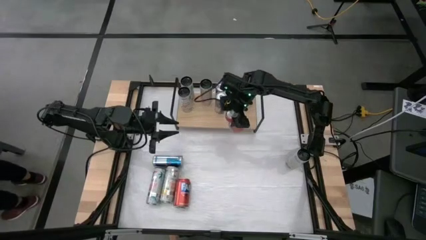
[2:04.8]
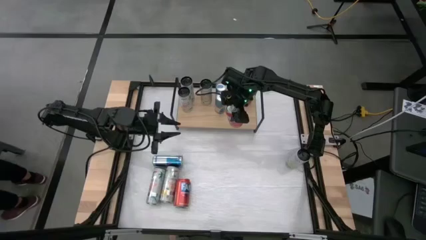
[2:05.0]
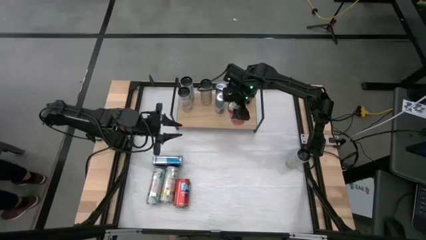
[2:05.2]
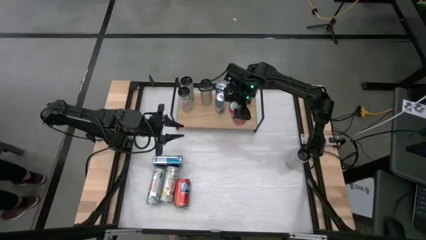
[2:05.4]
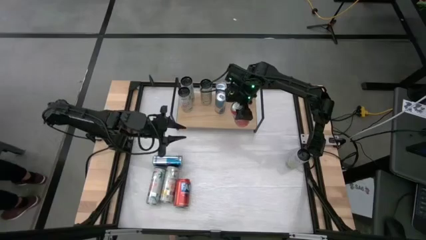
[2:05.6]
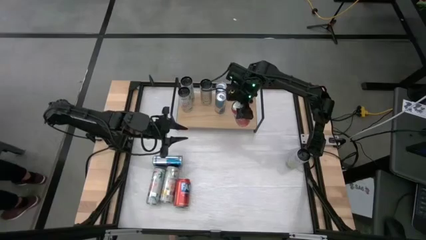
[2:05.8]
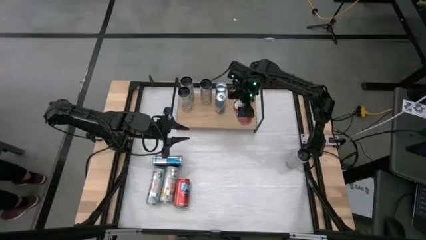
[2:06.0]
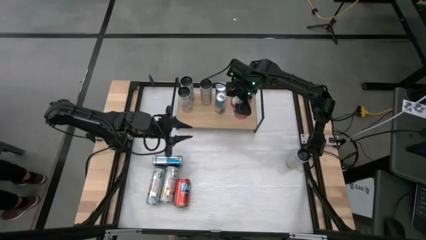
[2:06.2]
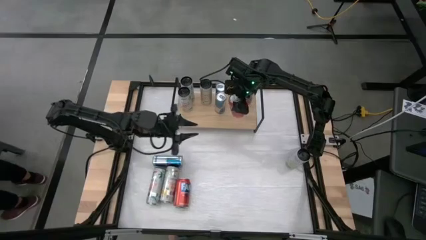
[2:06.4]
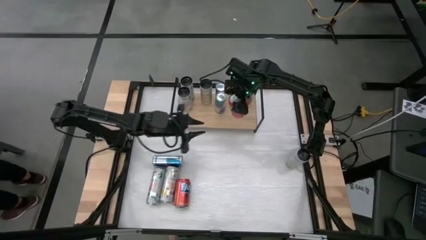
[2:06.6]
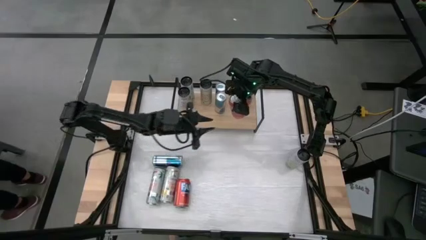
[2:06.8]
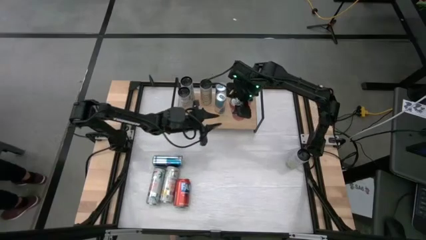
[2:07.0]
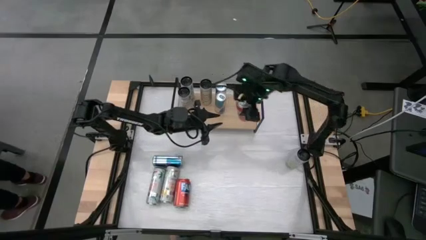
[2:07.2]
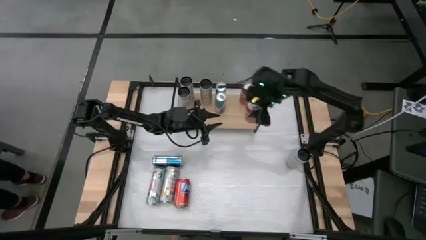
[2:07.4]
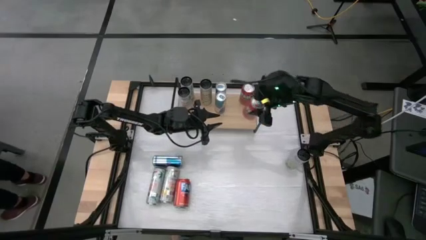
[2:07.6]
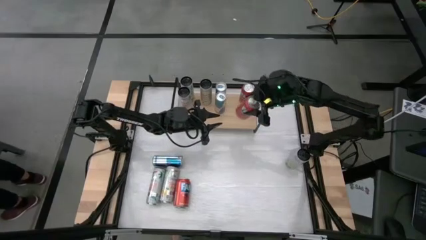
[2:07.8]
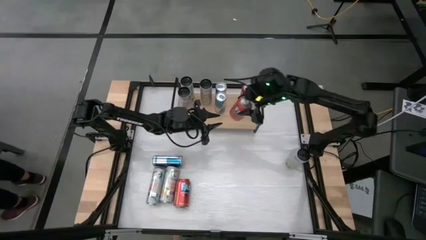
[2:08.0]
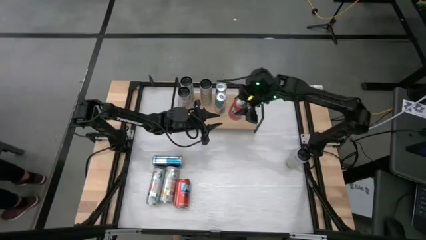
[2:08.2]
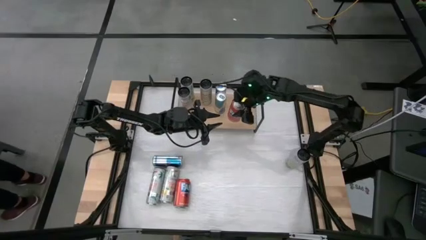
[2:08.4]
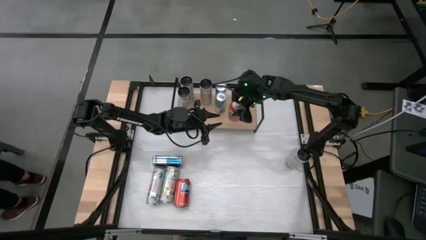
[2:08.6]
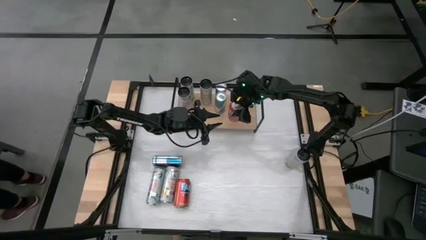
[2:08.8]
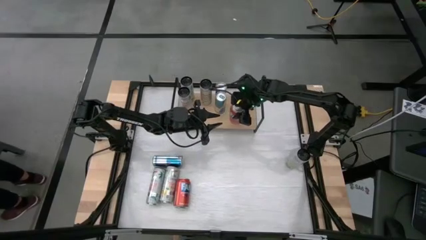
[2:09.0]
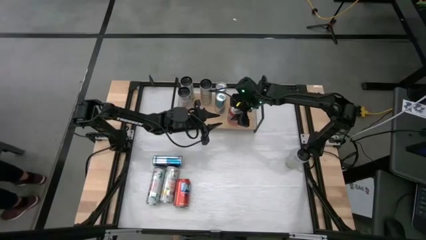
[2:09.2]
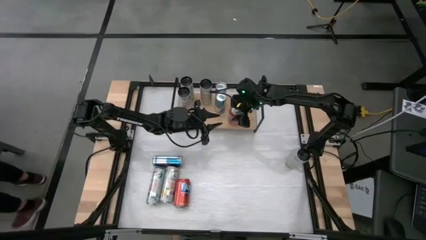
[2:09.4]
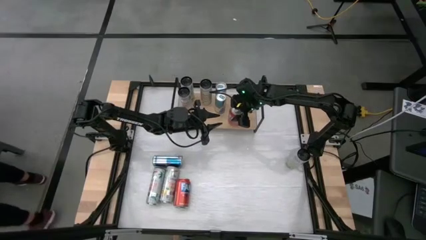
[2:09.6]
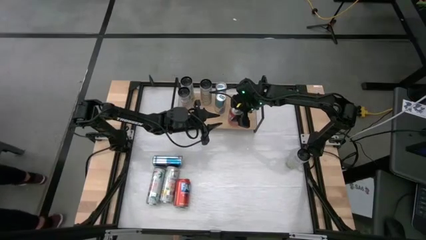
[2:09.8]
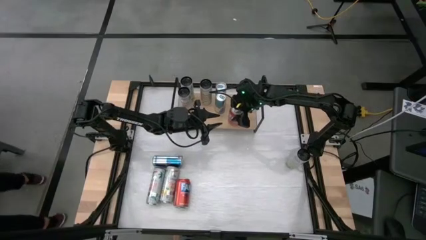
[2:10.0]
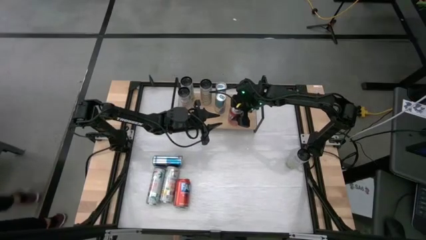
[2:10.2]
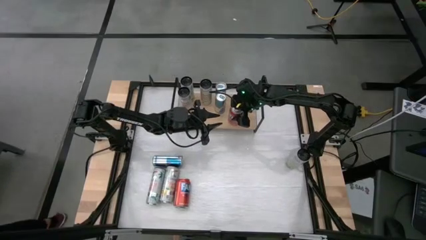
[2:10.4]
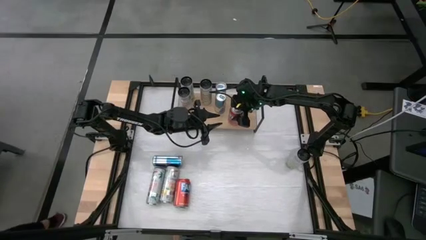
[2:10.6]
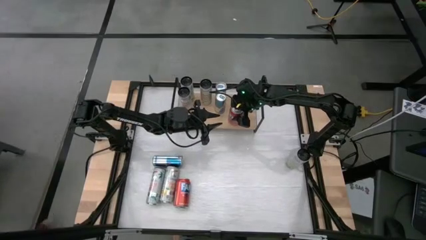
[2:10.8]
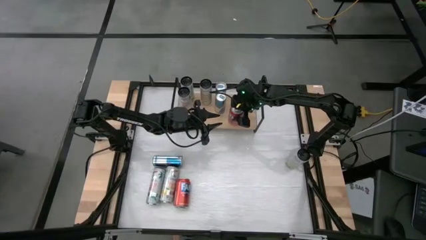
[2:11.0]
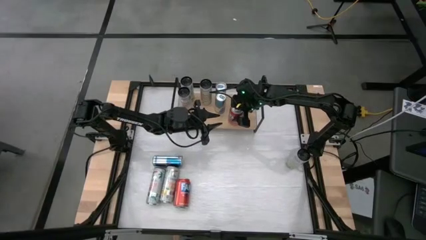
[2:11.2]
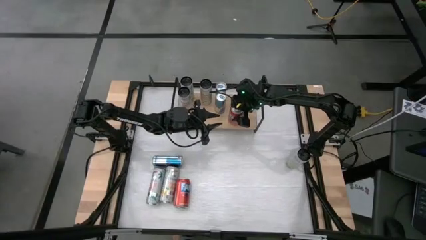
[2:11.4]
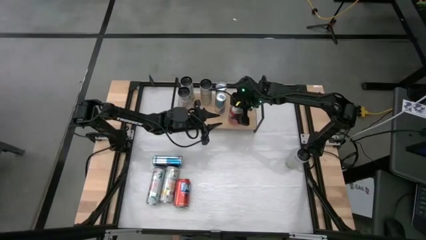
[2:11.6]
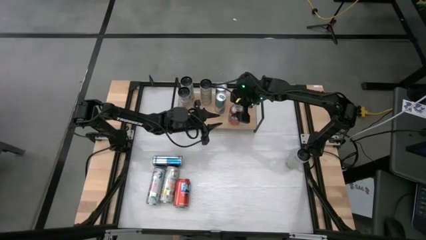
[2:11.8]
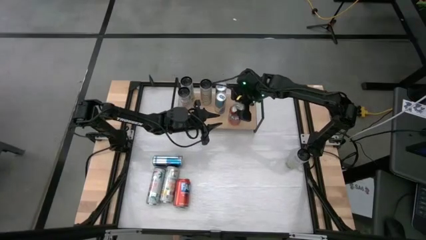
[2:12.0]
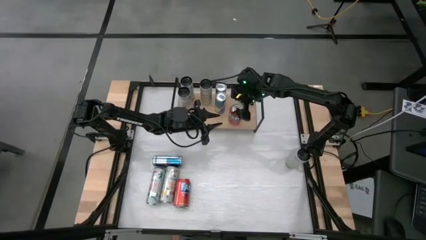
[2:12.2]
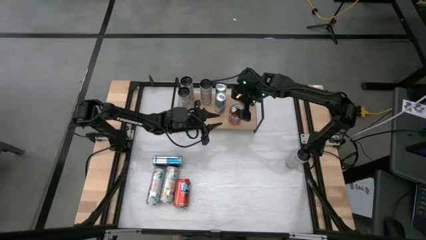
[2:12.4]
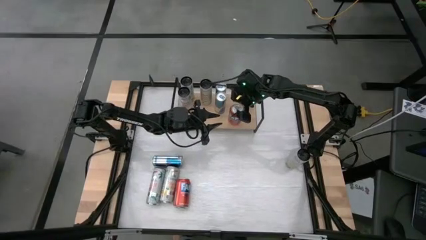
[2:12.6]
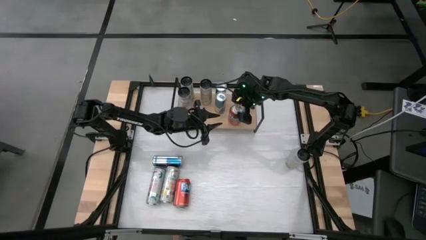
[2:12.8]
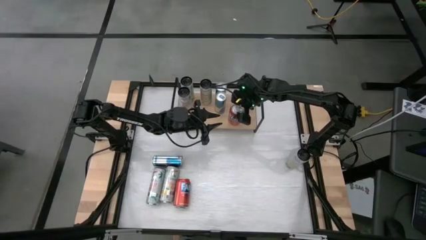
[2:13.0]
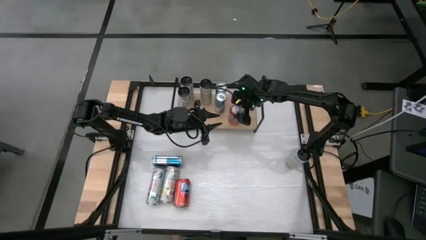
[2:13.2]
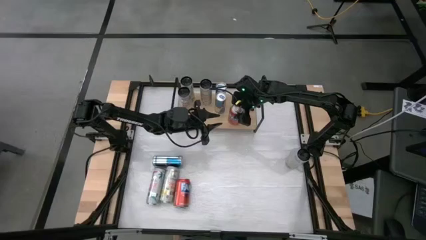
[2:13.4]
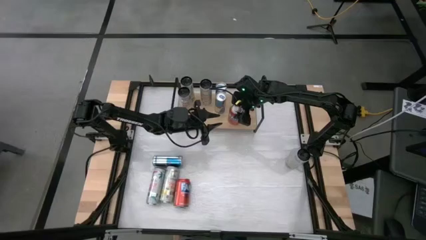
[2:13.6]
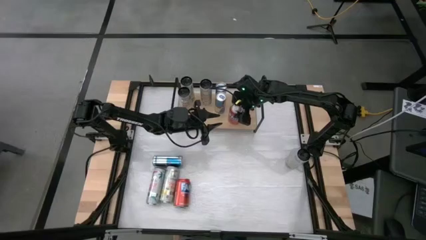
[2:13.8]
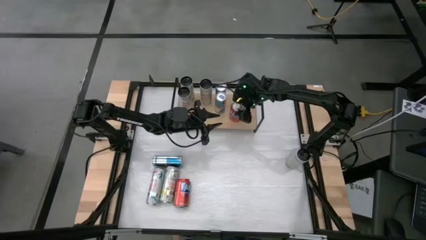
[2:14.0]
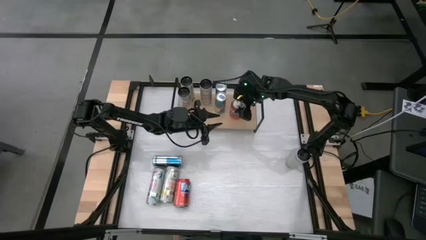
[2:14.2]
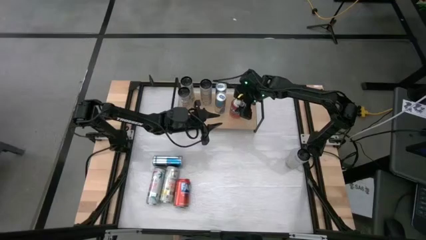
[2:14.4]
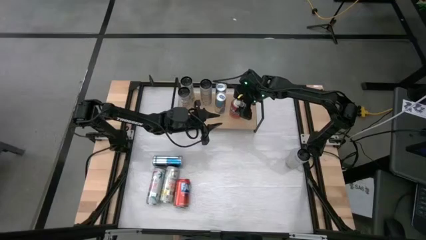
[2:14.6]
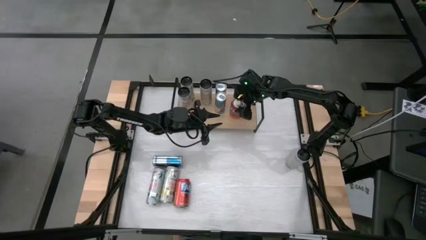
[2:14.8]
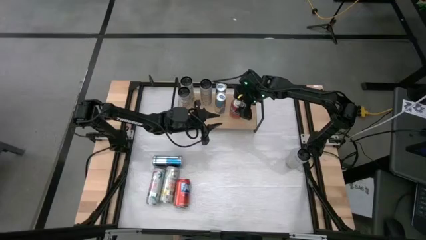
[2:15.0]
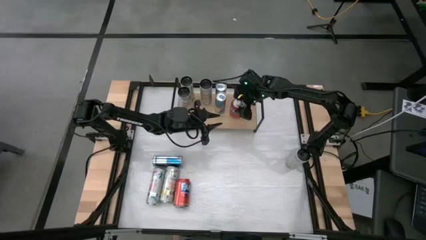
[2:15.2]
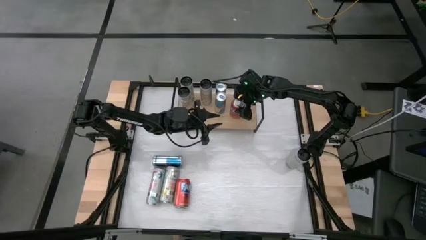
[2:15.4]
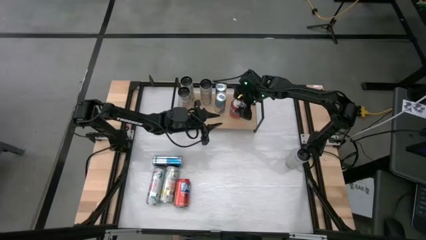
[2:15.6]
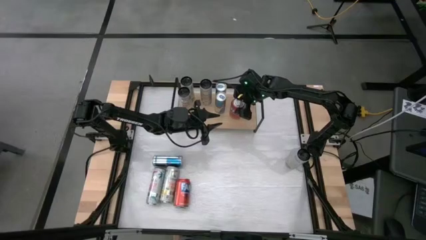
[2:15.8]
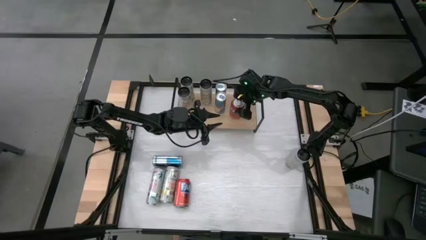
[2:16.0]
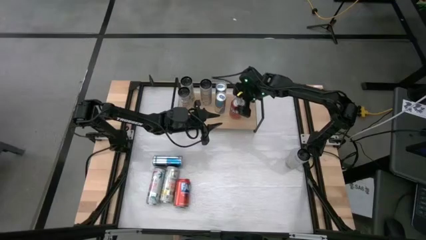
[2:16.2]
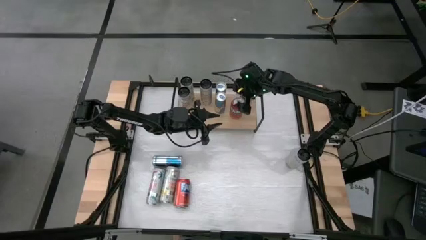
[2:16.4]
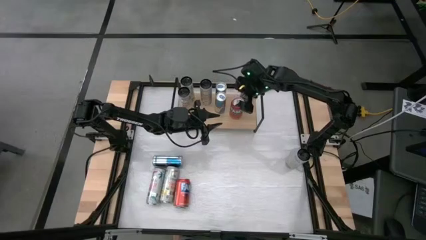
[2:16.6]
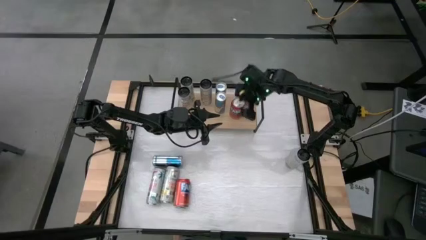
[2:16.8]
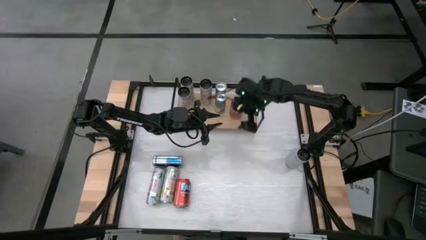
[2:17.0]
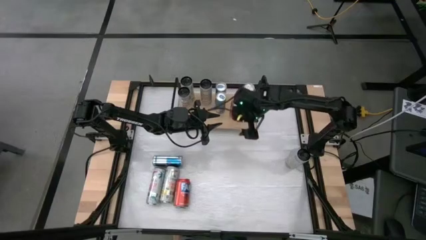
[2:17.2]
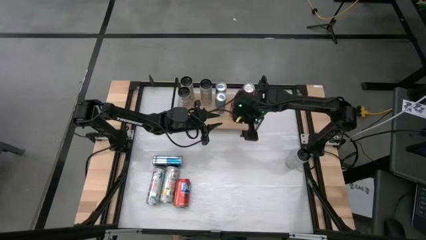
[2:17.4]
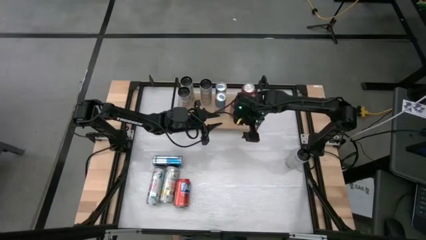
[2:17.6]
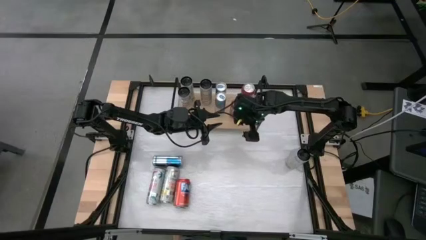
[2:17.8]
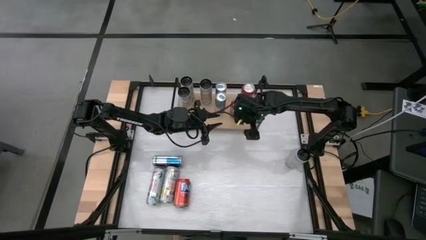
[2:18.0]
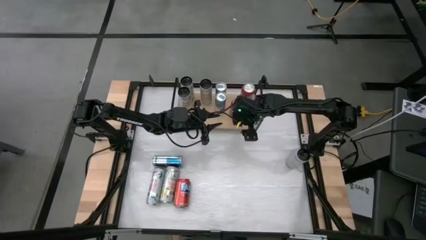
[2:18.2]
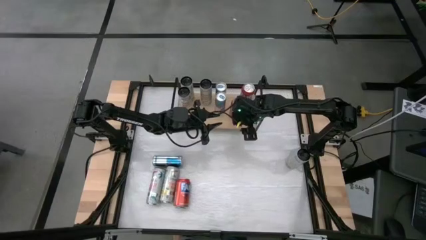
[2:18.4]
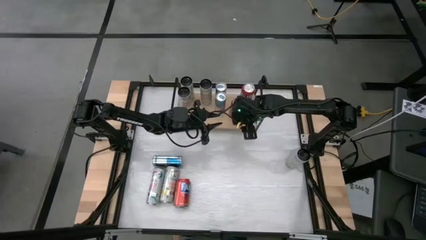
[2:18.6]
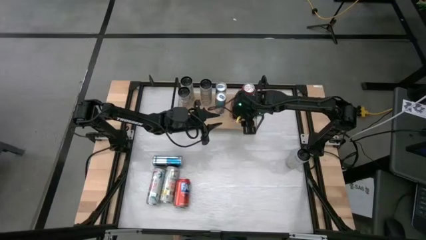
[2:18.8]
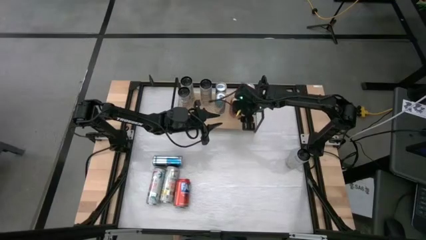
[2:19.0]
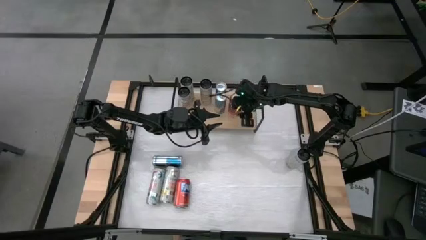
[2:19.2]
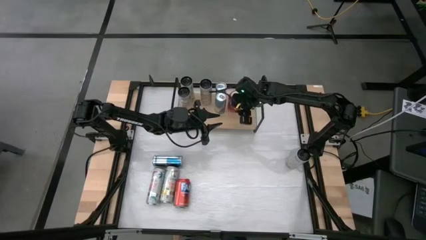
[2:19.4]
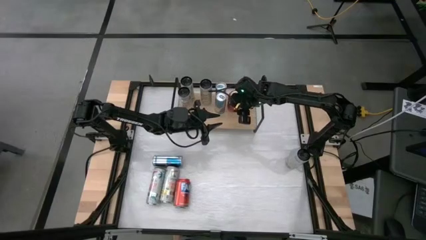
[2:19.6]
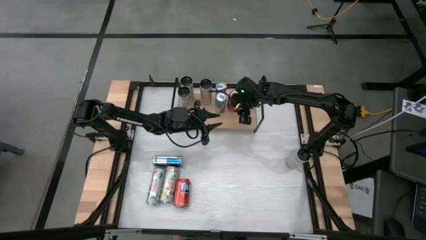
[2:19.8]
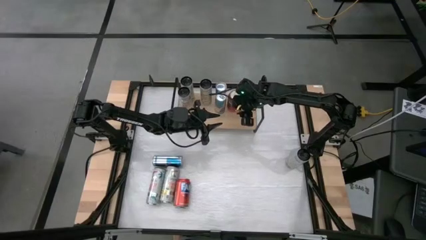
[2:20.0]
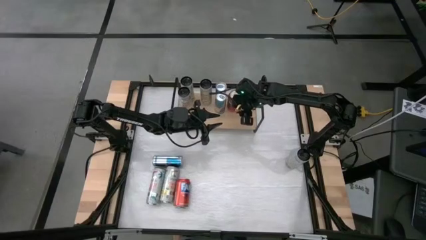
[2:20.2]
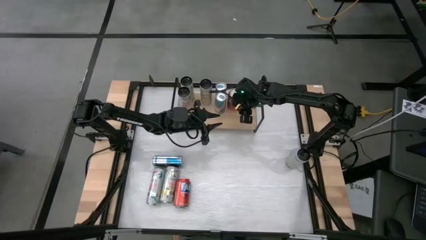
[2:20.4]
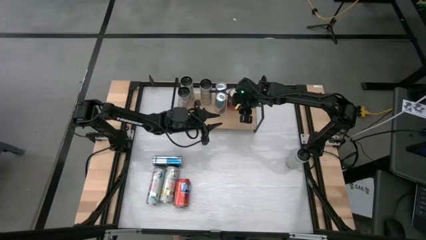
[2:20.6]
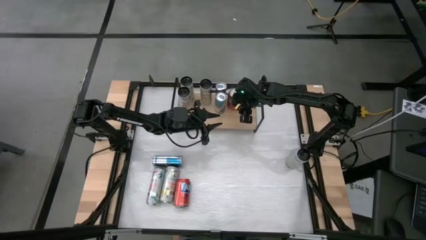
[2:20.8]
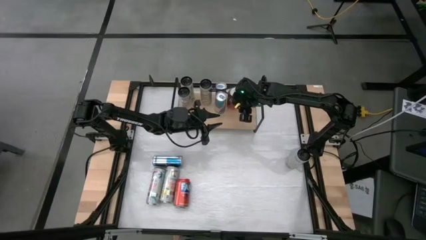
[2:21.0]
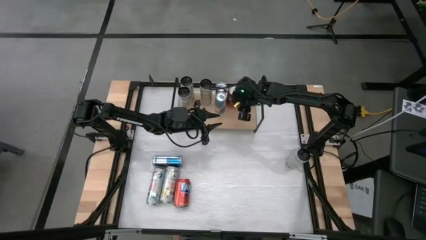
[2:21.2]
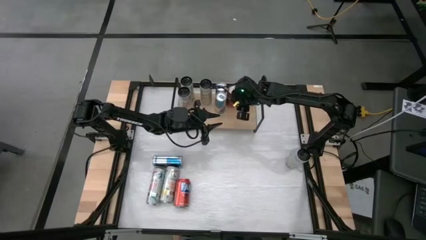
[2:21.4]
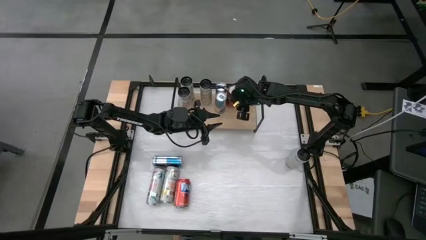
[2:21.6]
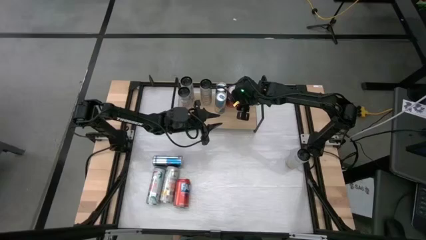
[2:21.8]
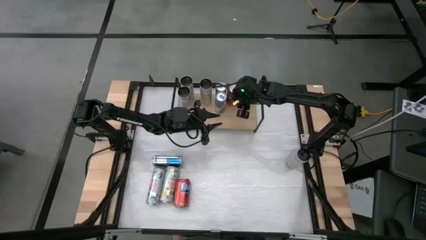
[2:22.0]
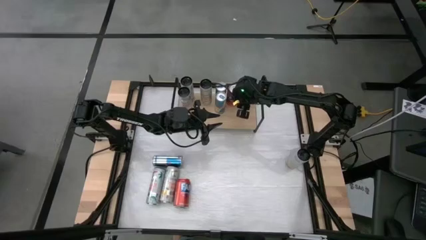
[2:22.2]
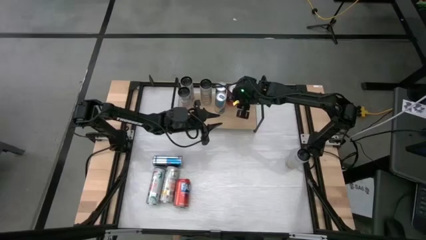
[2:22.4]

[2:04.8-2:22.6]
Task: Place canned beverage on shelf
Put the right red soda can on the shelf
